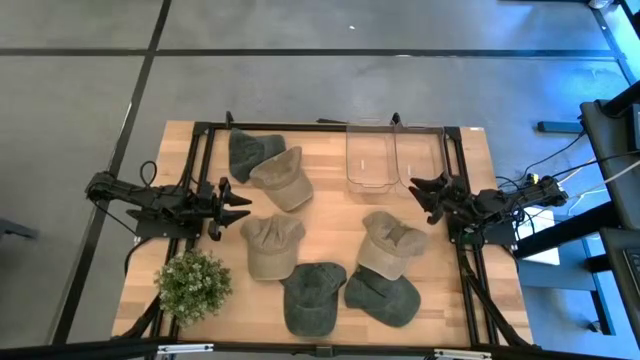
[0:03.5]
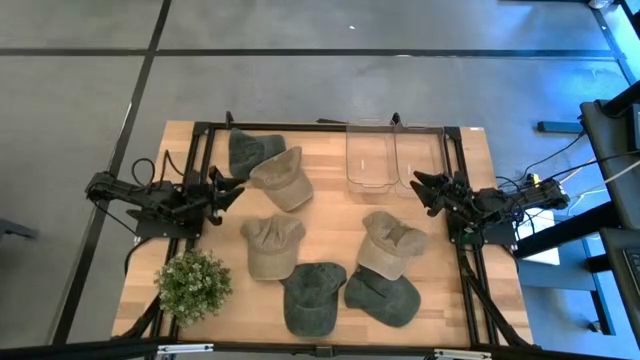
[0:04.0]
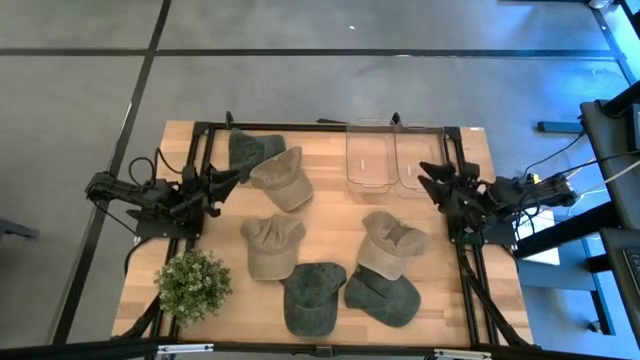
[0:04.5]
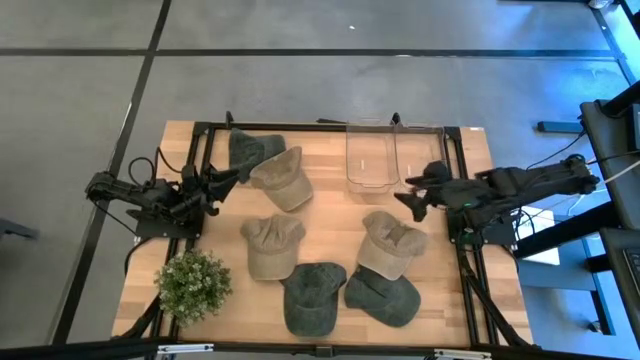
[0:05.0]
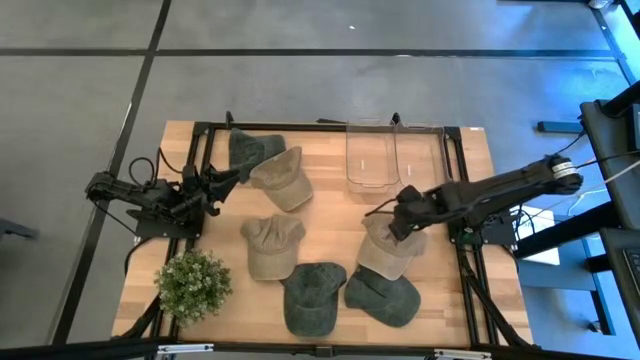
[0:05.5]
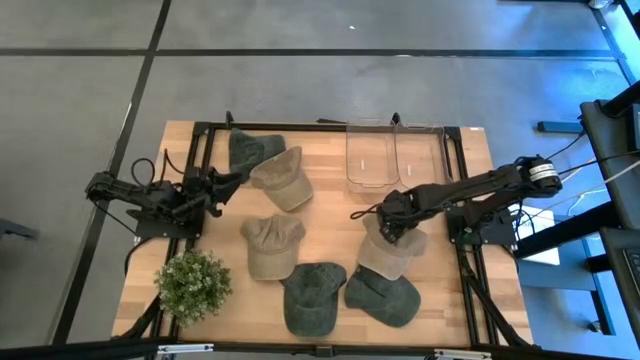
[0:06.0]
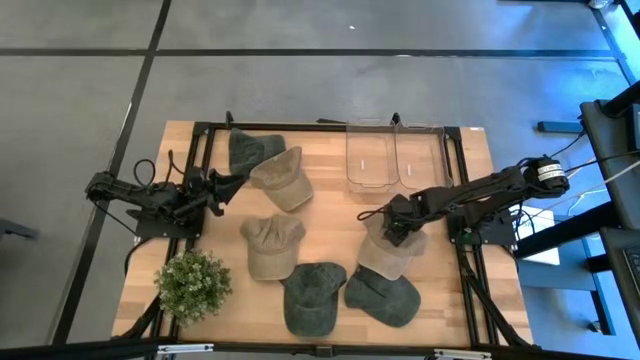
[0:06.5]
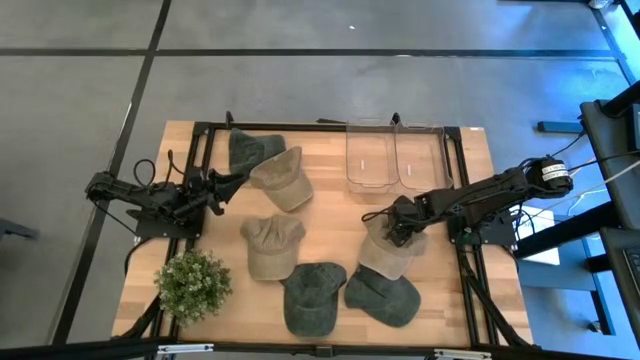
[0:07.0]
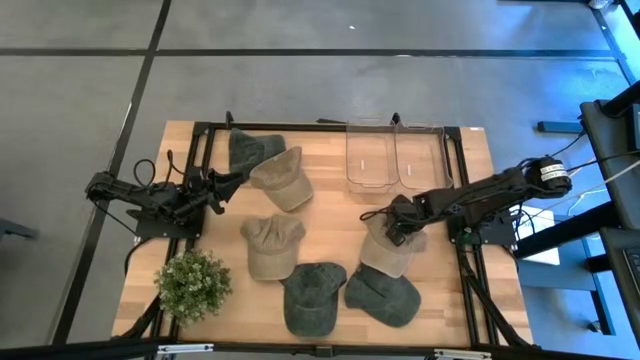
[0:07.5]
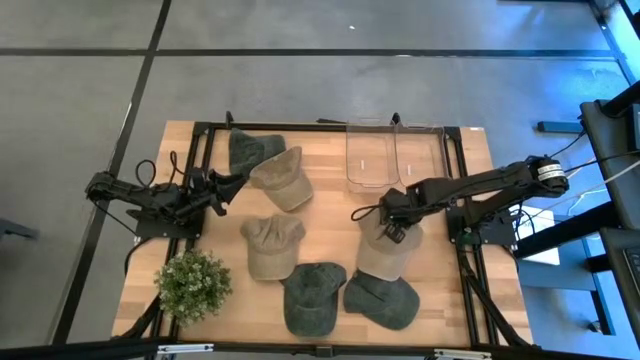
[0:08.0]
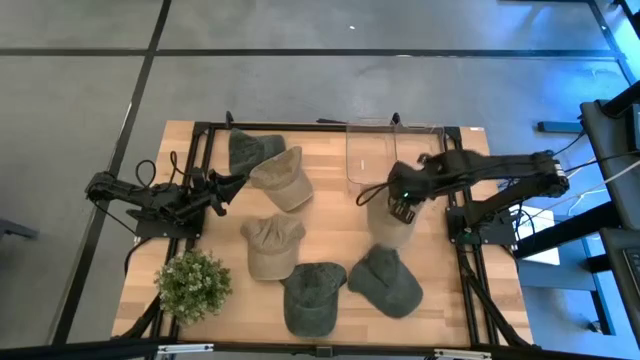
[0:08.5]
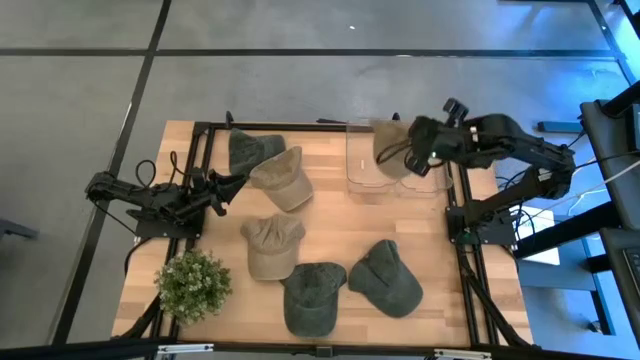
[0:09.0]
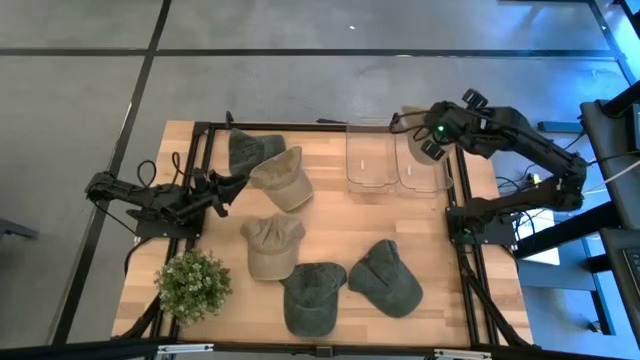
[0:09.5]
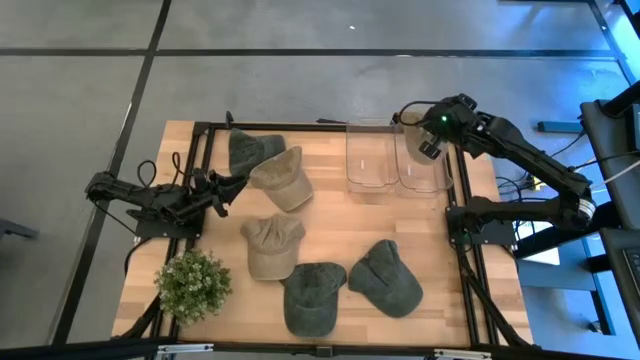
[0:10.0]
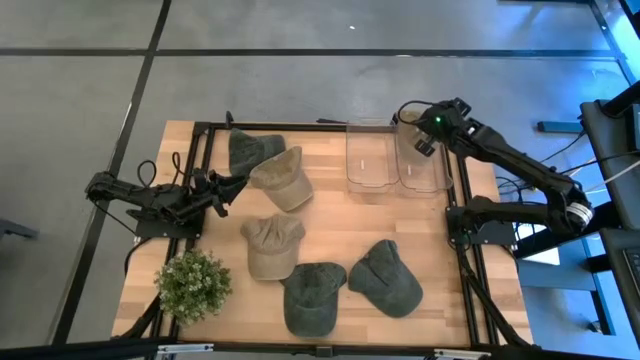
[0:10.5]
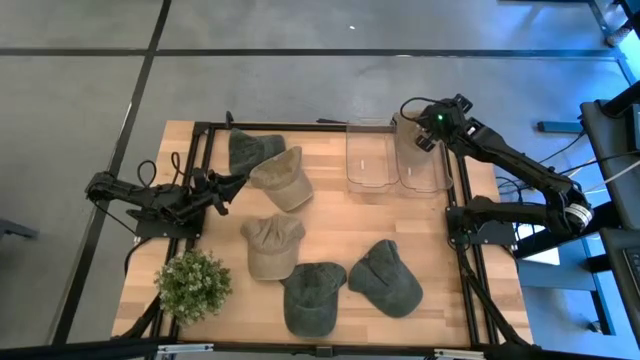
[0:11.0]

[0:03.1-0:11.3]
Task: Pick & Place hat
Put the right brown cap into the right transparent bin

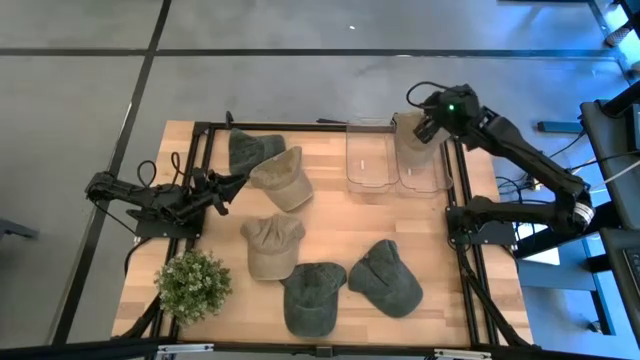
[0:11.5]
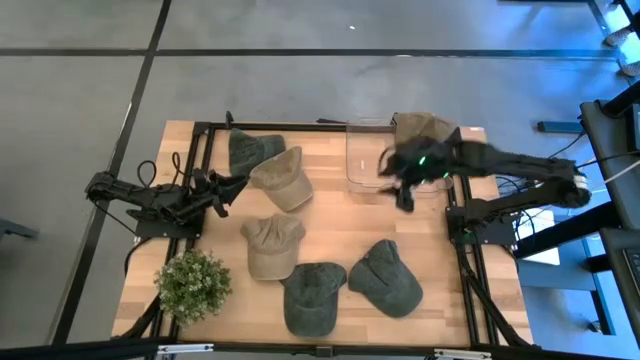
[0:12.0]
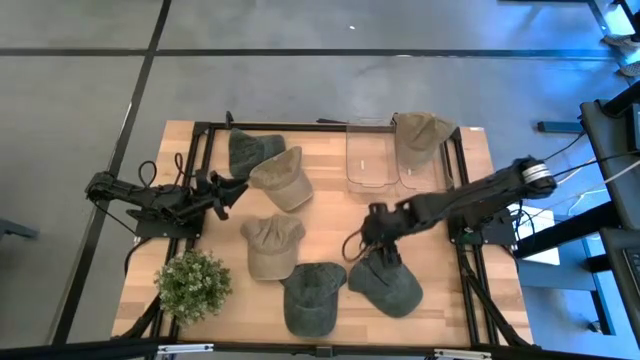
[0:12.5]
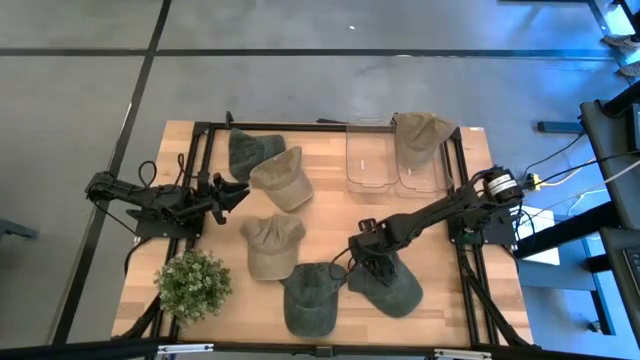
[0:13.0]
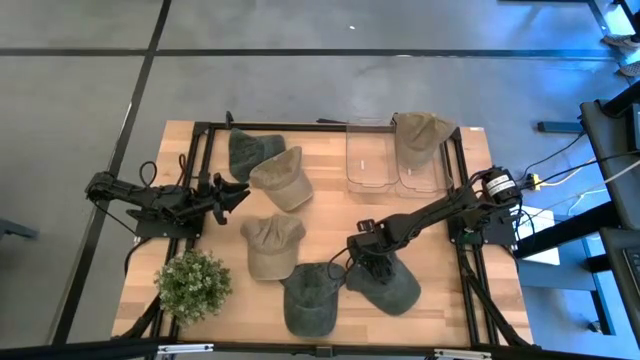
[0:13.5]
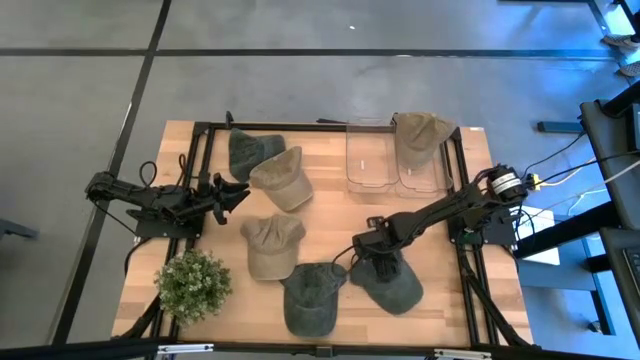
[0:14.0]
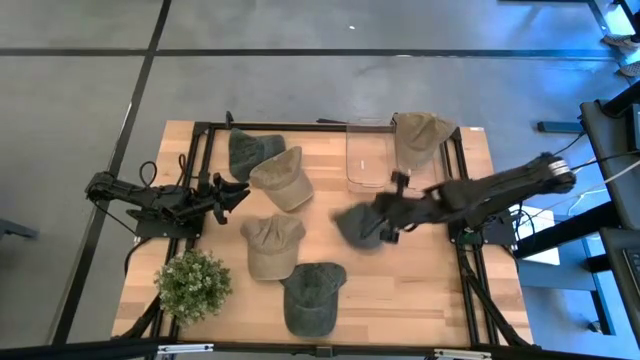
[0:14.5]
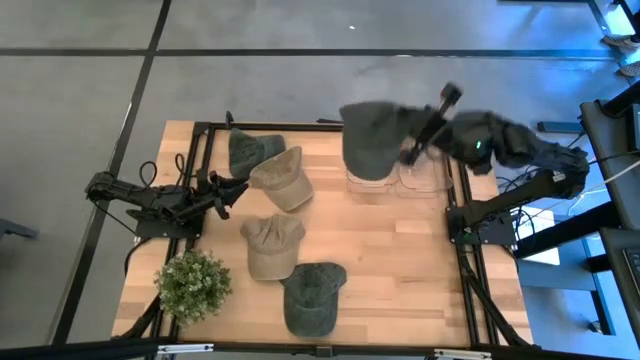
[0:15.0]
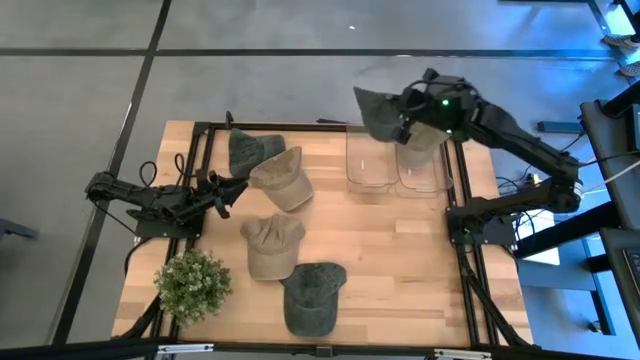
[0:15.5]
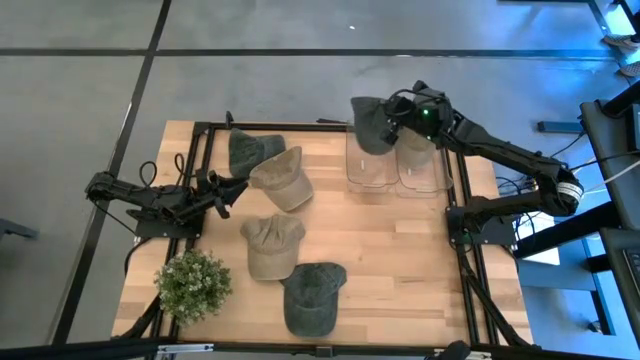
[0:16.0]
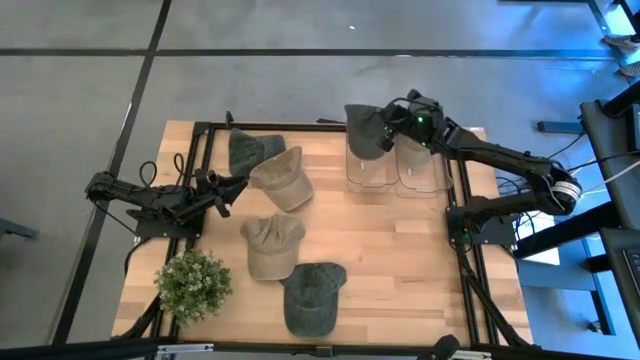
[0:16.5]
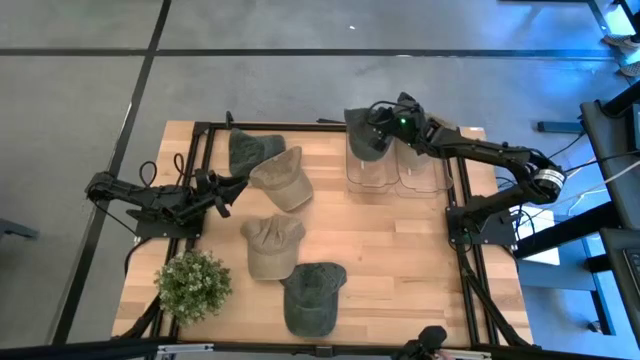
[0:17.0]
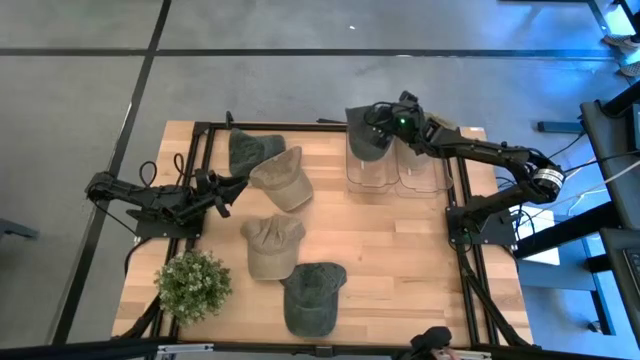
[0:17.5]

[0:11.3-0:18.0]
Put the bottom right black cap into the left transparent bin

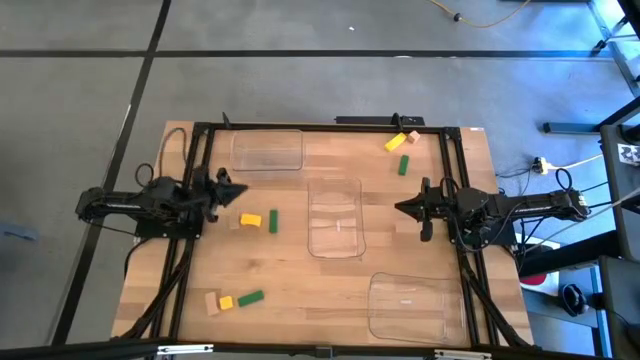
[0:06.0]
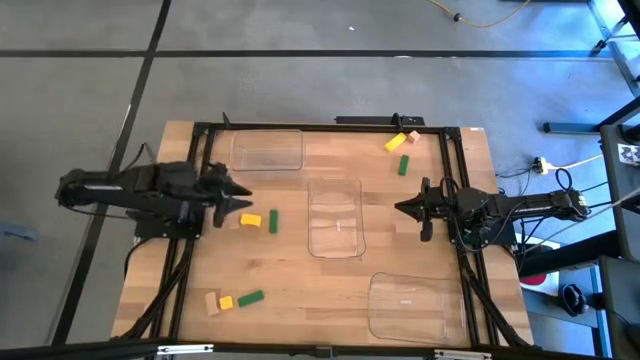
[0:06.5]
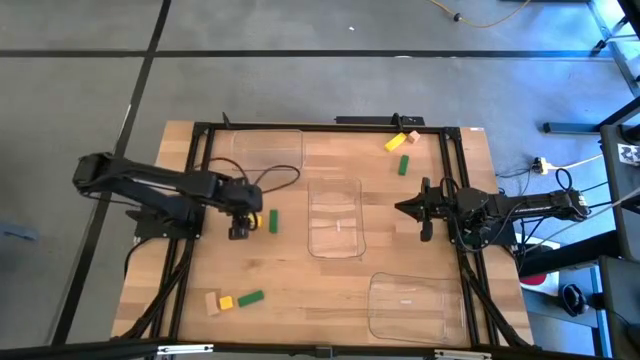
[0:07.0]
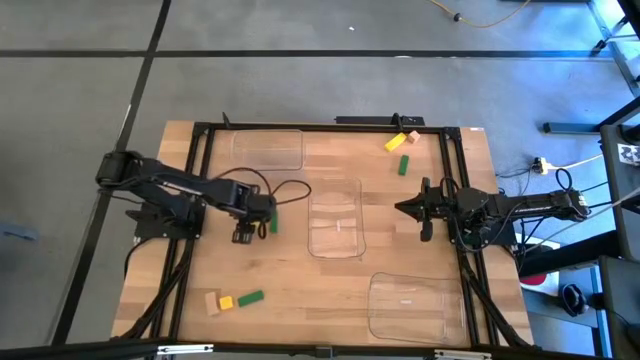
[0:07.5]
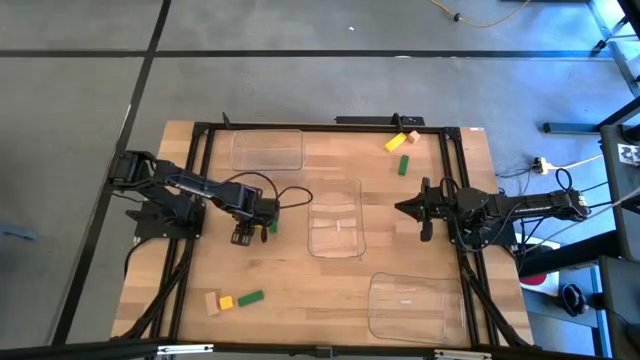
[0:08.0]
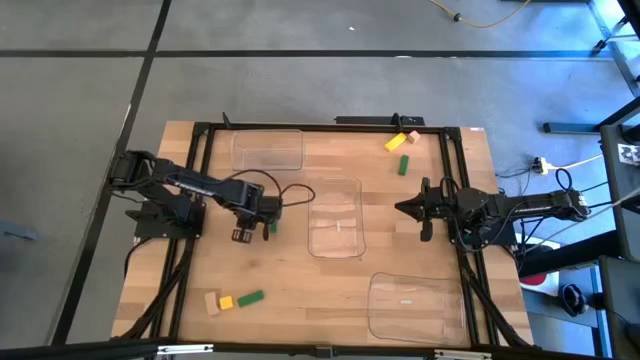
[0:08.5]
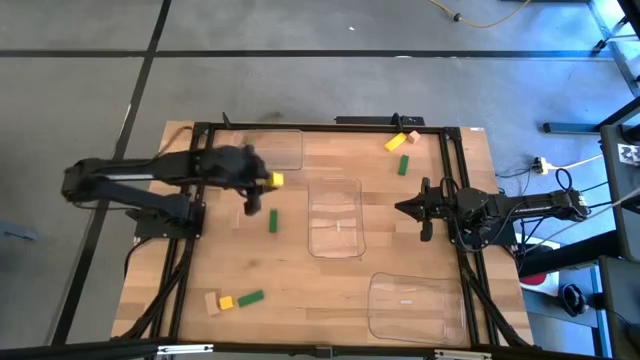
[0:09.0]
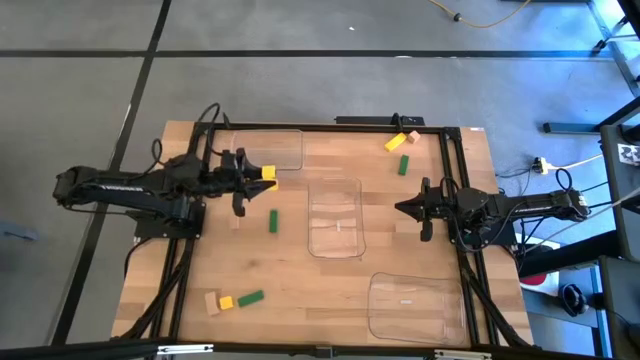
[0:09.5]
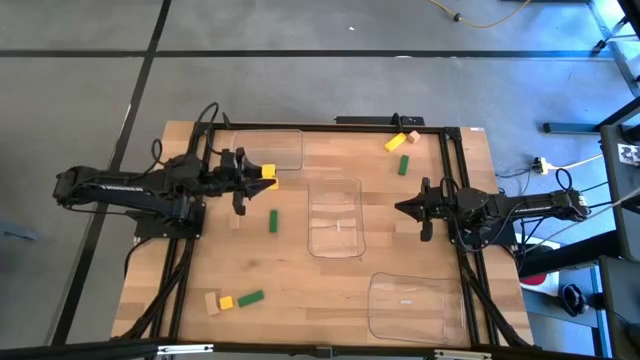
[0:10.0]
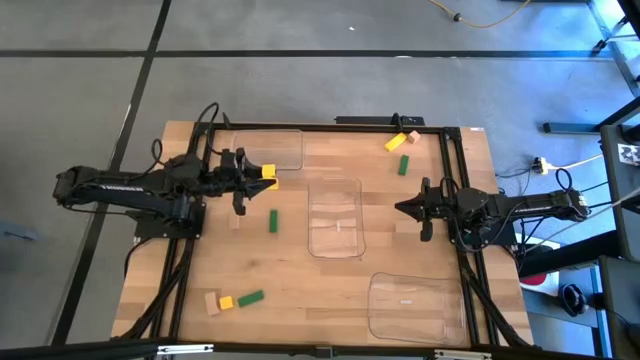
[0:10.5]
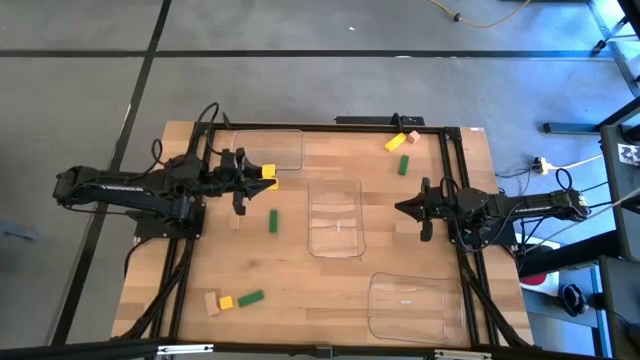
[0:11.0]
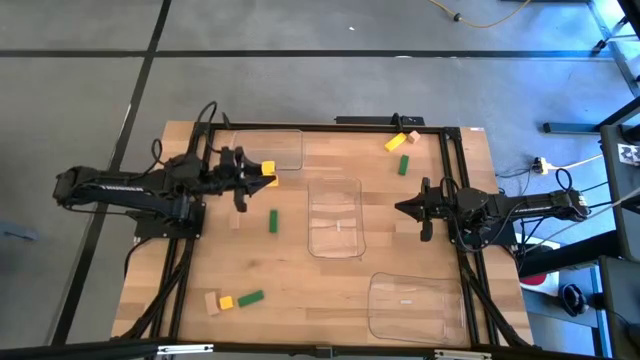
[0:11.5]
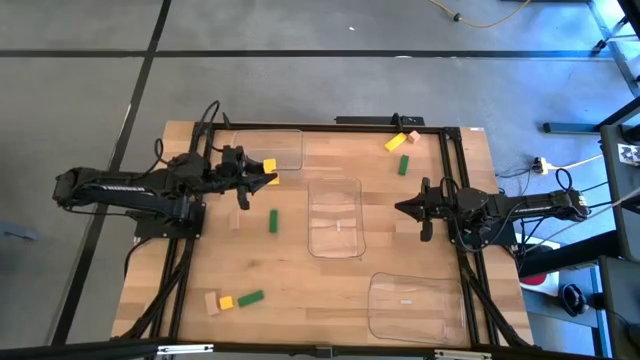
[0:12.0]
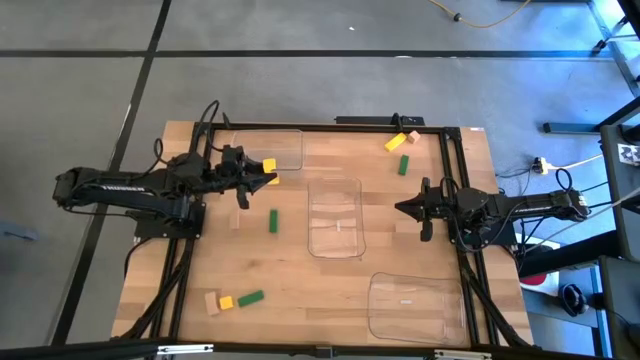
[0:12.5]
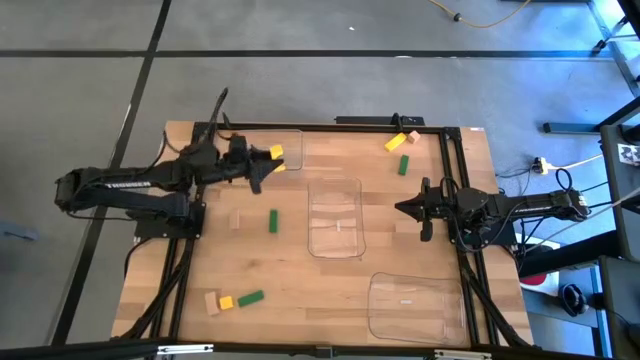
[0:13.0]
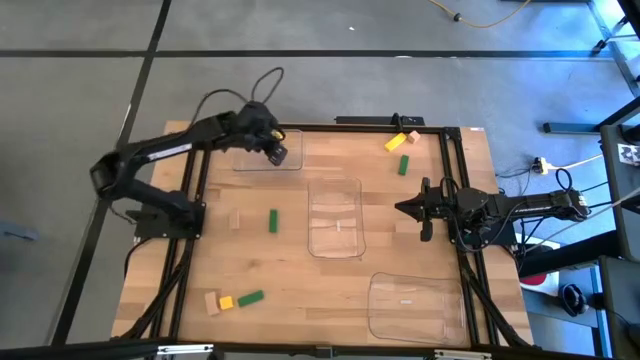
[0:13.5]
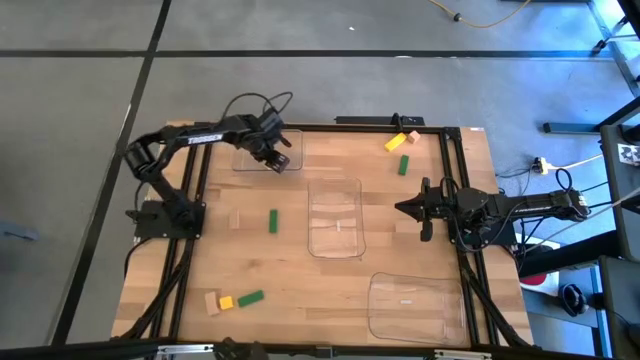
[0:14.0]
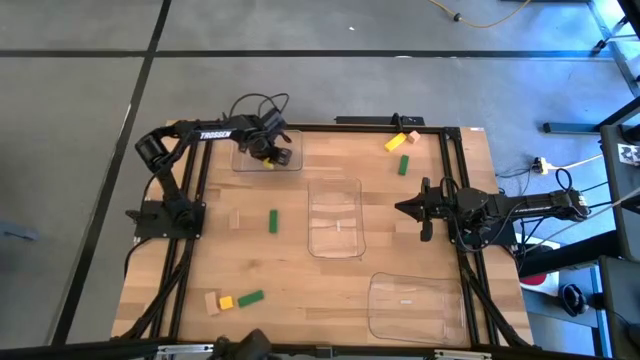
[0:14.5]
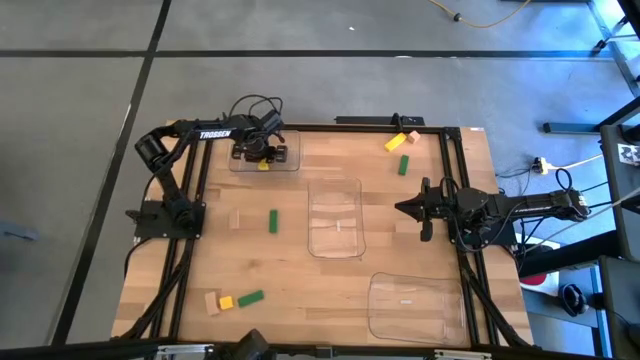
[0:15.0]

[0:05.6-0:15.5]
Task: Sort & place blocks by color
Put the middle left yellow block into the top transparent bin
